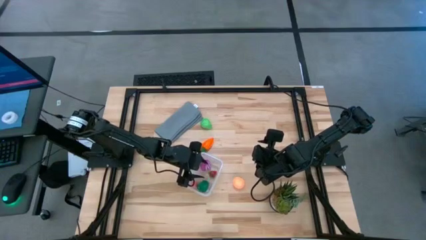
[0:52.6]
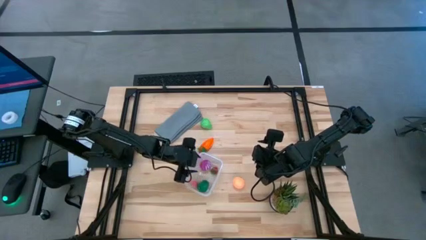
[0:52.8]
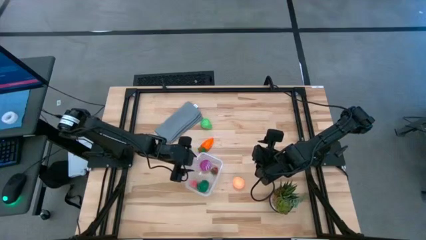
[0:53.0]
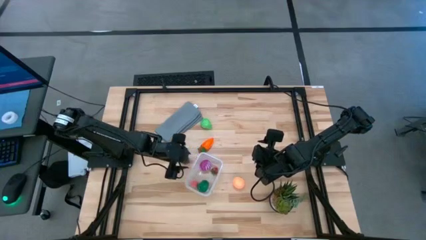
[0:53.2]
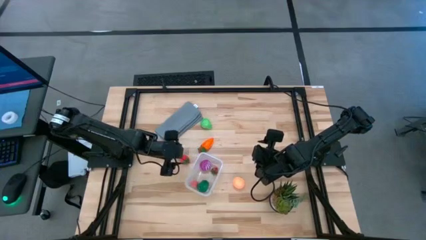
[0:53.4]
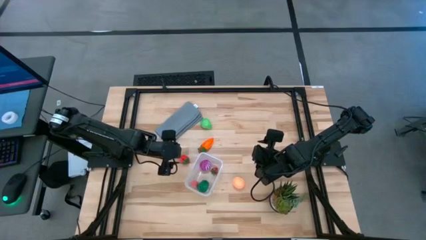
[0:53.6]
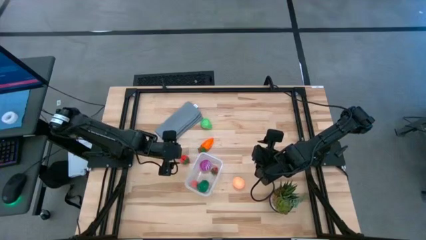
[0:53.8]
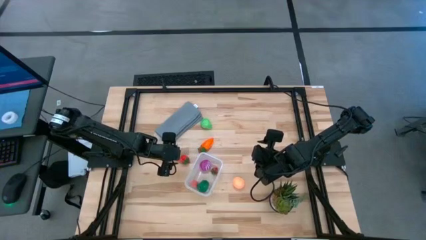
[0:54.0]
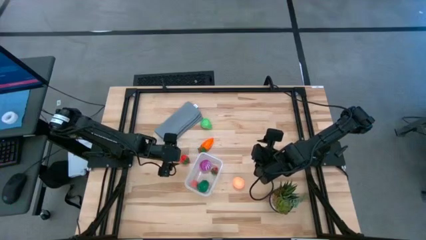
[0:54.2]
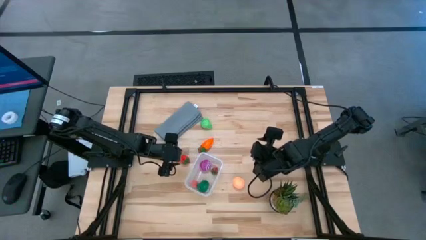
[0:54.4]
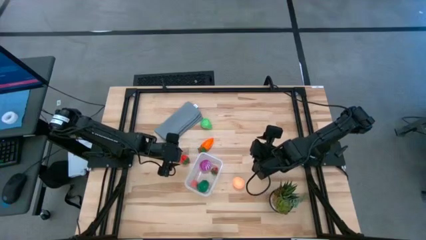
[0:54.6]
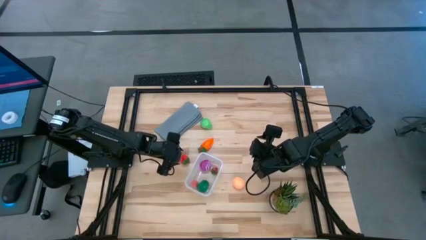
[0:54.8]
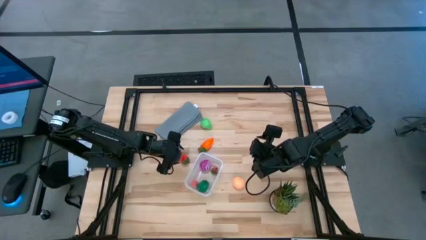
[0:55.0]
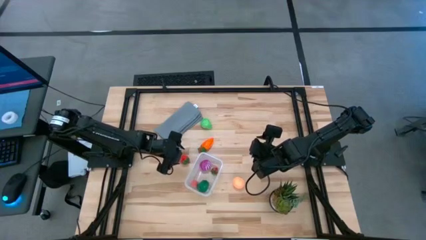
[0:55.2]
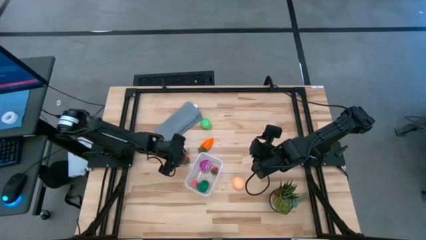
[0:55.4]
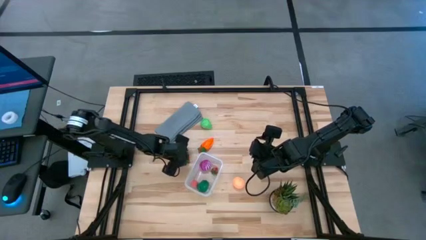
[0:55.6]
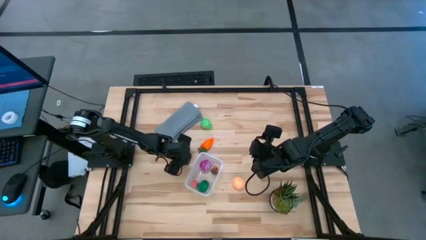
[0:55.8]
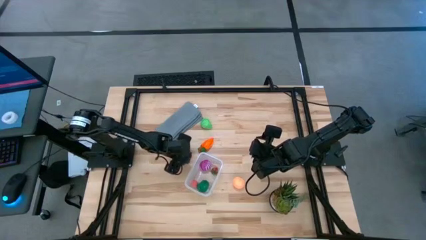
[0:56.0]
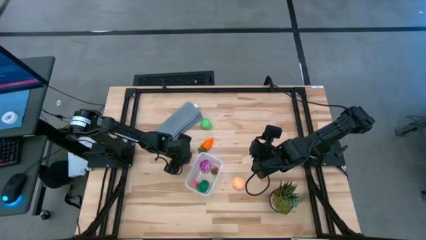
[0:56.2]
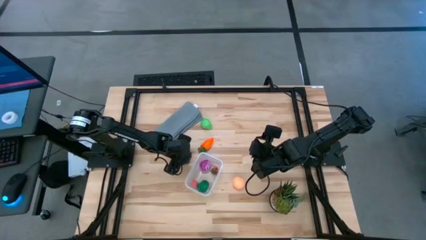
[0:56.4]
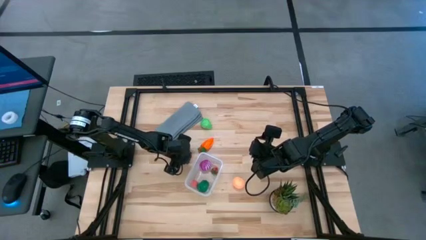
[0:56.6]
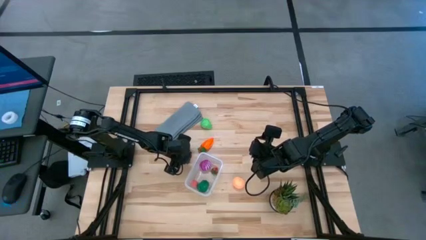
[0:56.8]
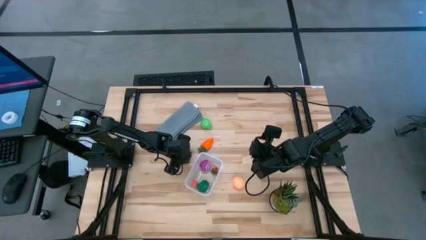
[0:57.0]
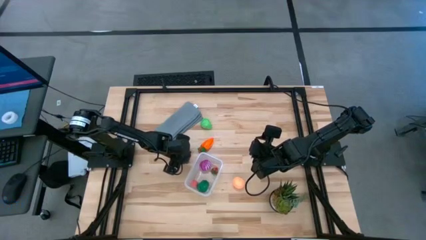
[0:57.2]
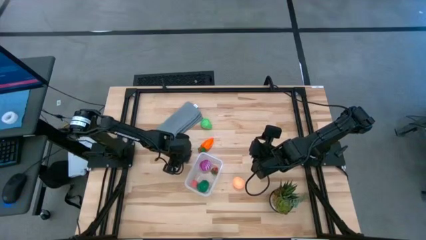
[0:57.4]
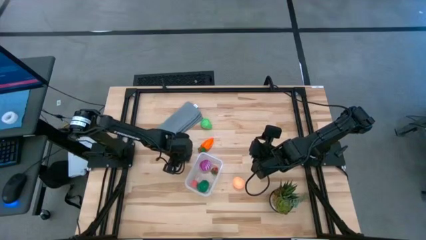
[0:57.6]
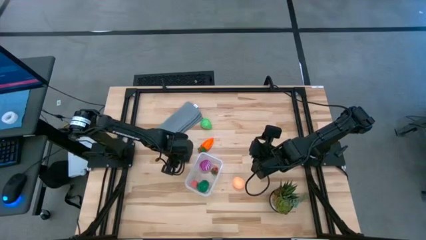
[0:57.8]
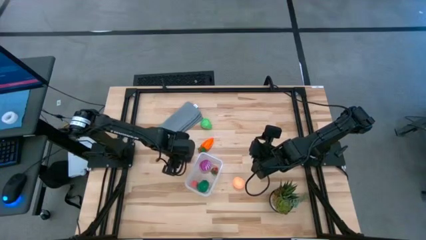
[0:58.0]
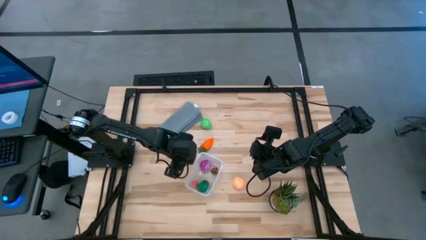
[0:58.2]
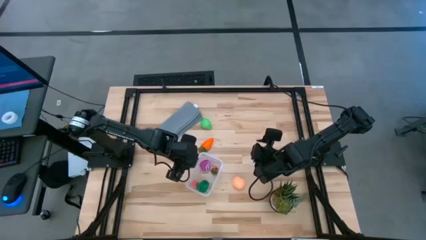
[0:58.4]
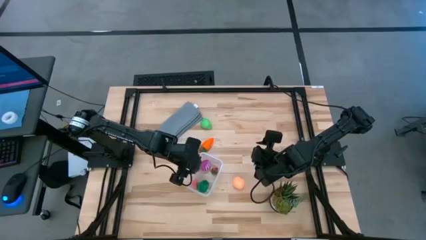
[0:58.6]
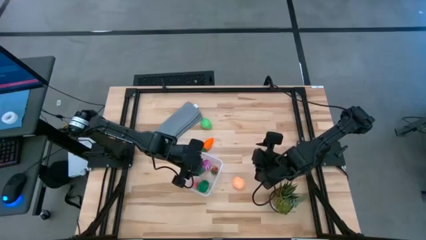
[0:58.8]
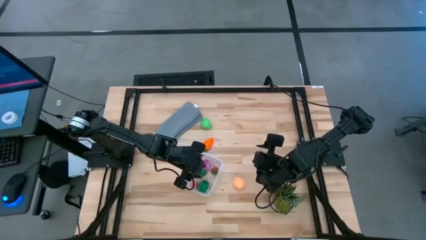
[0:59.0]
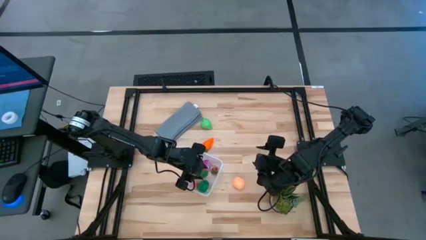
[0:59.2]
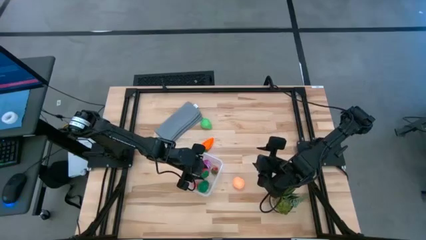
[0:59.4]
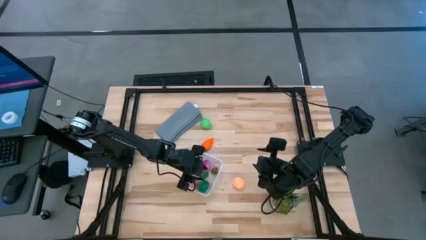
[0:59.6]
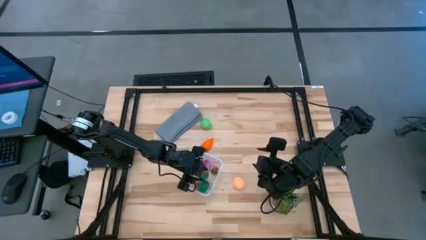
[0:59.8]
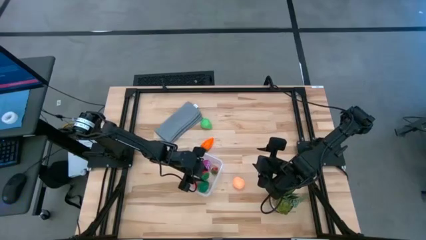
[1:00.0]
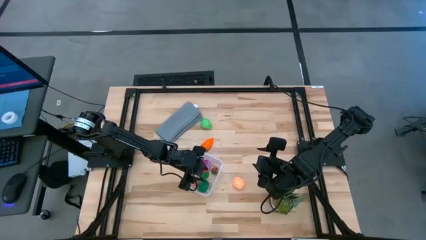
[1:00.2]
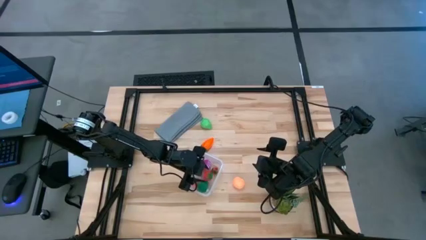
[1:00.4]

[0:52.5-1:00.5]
Task: Pick and placing Produce into tupperware
Put the red strawberry into the transparent bin

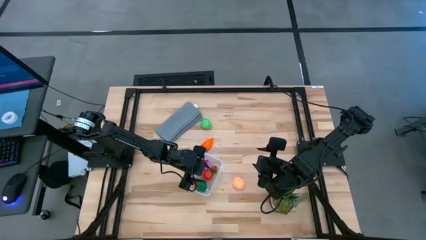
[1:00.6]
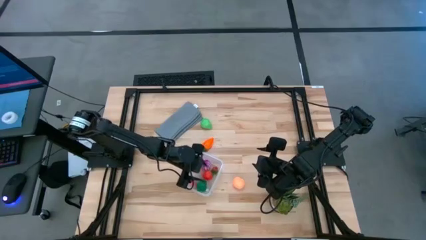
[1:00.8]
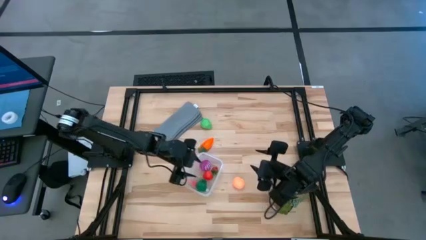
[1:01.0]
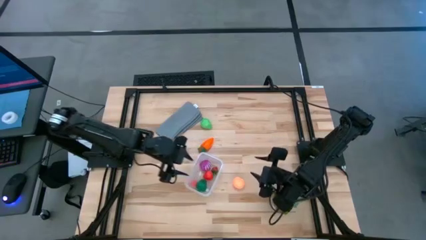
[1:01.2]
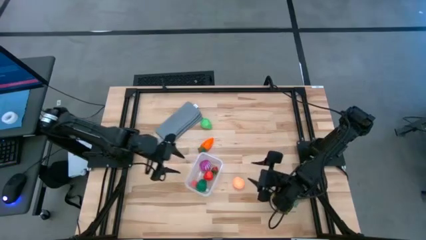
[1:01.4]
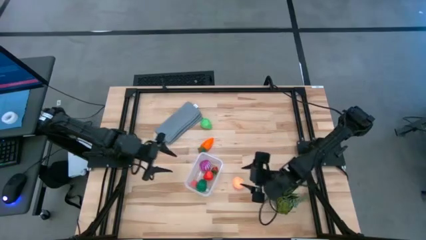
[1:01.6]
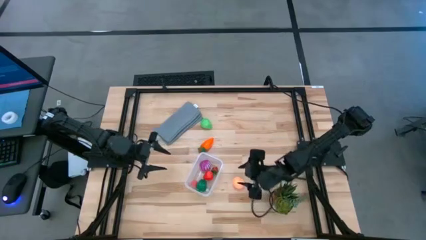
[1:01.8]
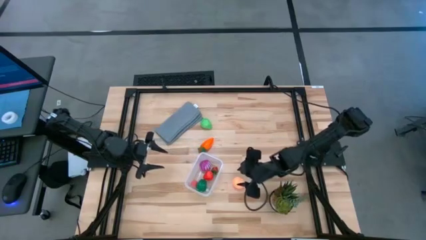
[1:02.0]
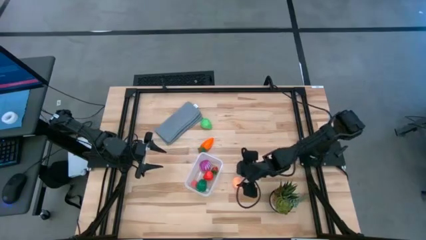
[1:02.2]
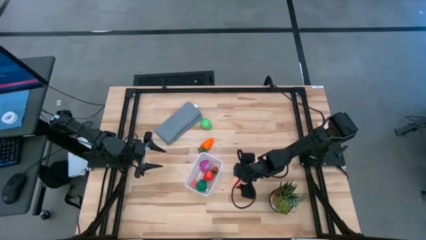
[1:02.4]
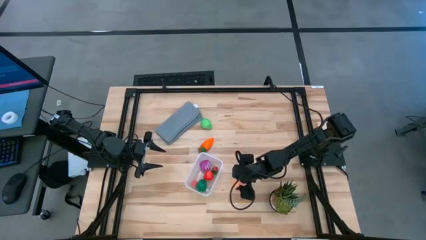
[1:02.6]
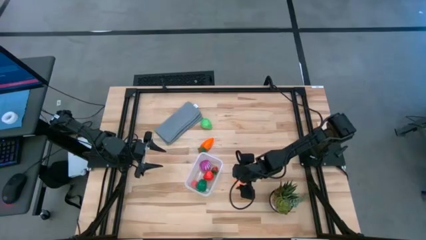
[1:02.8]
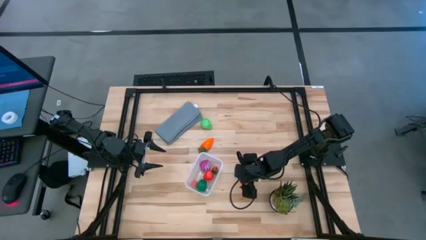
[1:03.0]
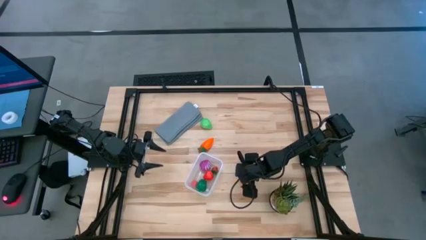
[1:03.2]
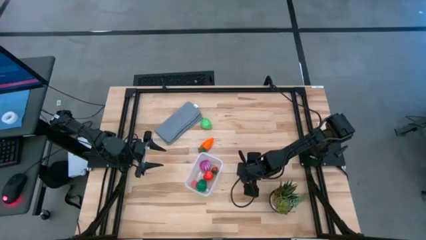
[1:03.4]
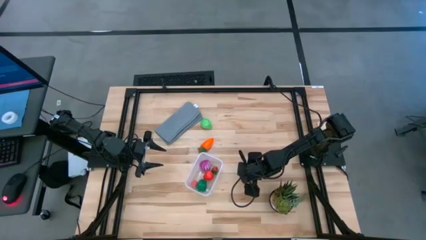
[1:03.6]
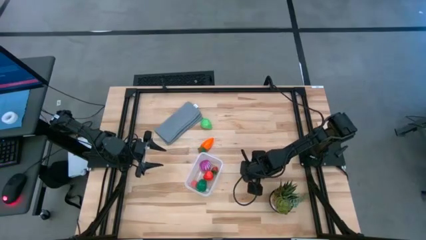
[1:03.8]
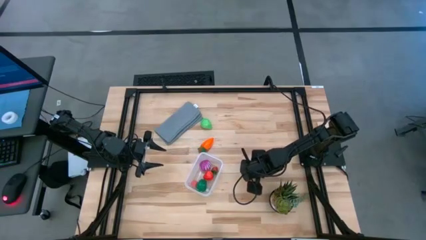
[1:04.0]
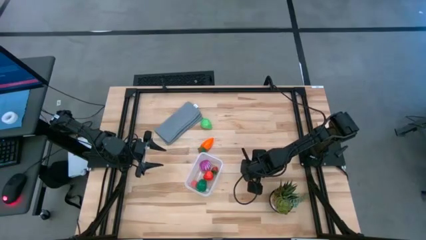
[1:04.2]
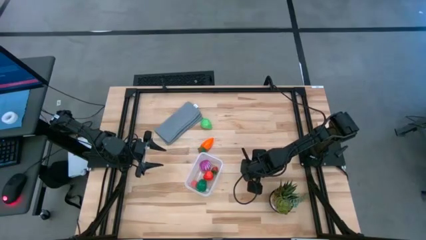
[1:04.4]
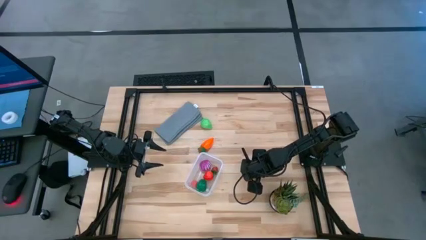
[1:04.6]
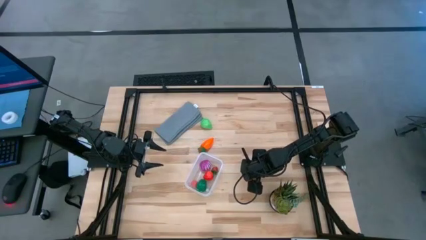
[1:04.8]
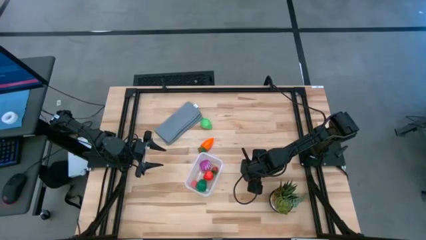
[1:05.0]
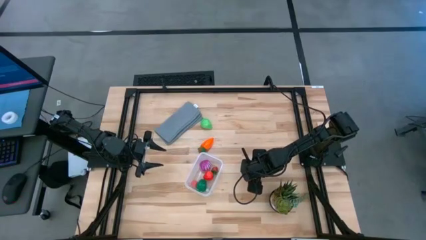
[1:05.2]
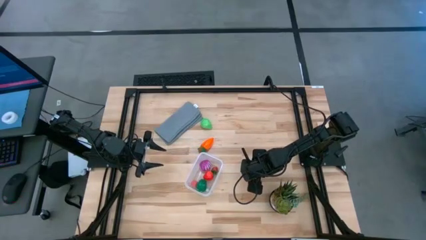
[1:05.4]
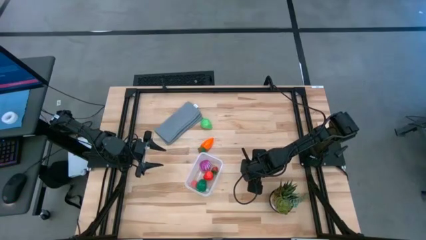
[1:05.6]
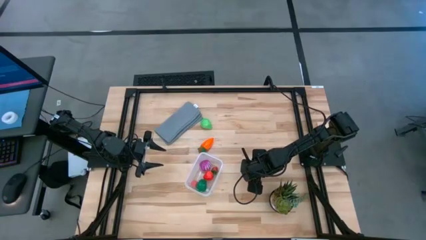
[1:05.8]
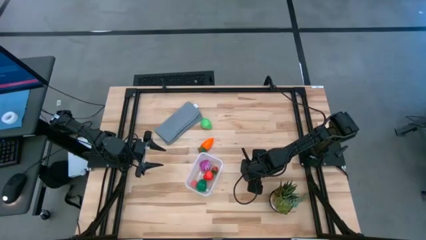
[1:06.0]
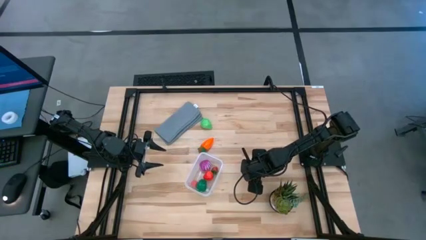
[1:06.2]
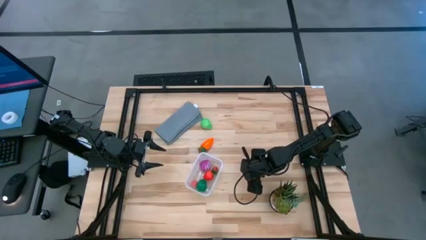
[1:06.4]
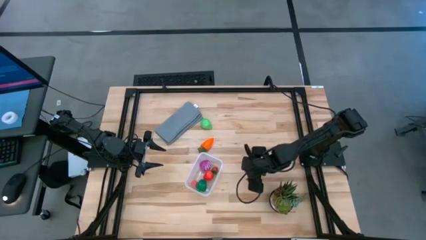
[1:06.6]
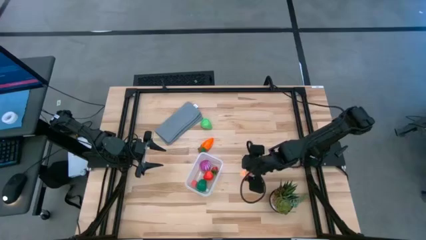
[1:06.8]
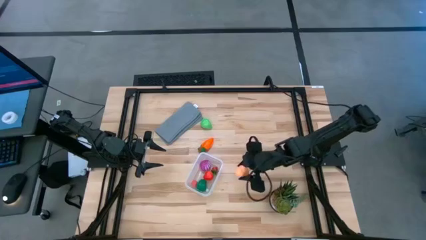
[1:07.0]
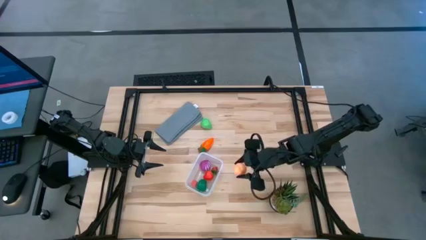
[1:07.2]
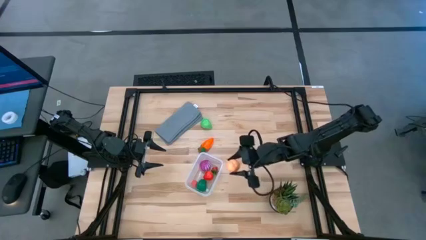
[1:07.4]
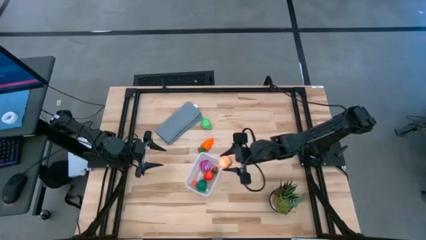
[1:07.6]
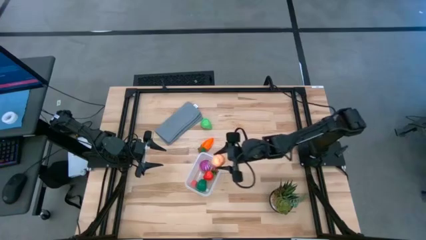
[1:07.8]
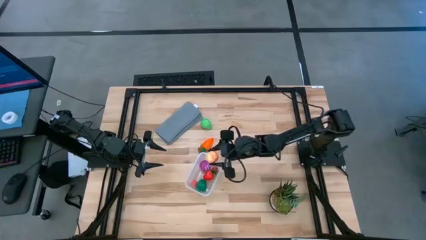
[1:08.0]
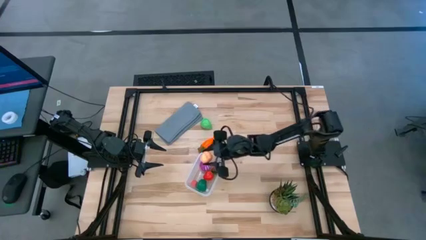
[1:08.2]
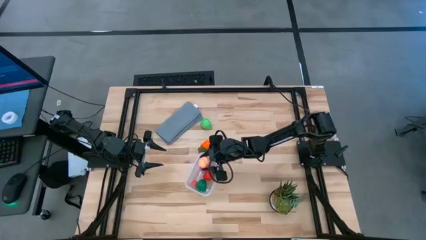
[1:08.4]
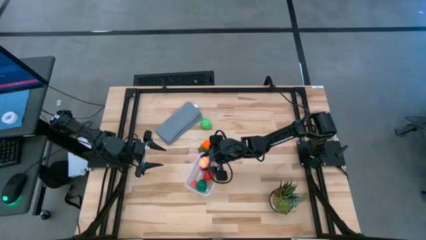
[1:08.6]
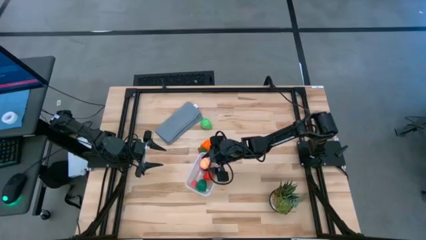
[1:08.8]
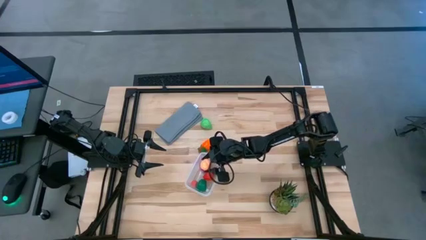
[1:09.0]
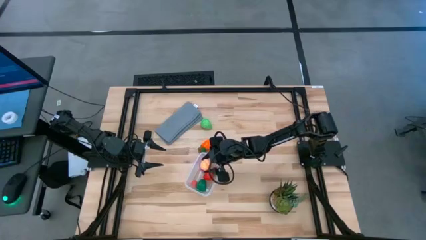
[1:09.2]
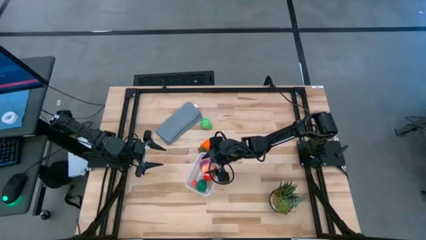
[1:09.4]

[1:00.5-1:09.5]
Put the light brown peach into the transparent bin

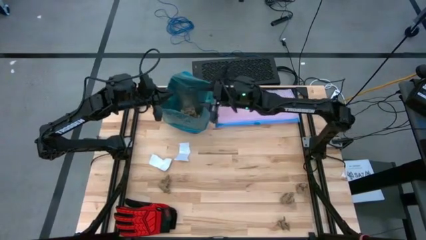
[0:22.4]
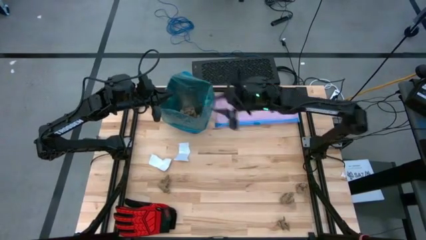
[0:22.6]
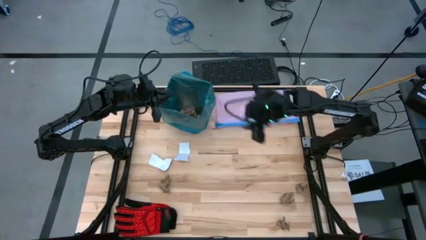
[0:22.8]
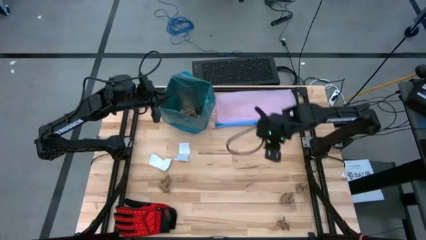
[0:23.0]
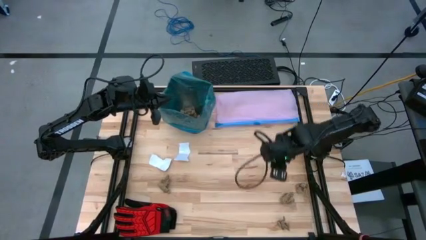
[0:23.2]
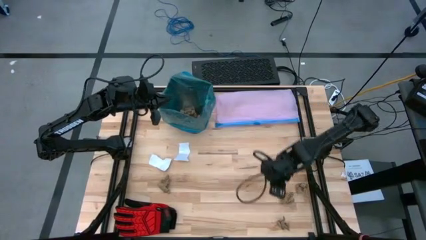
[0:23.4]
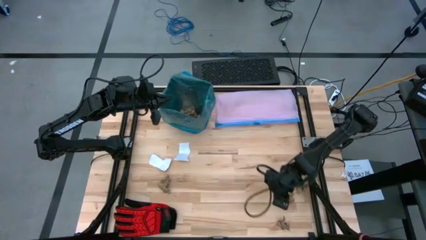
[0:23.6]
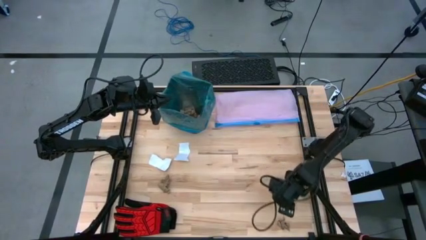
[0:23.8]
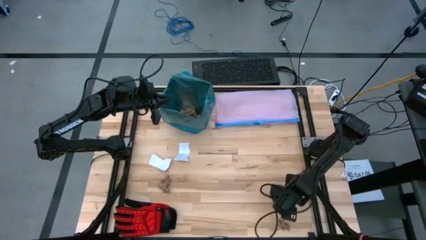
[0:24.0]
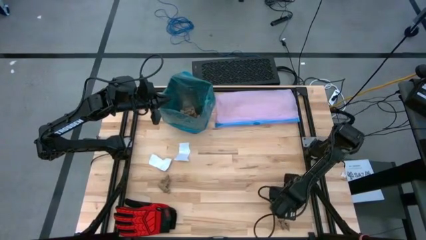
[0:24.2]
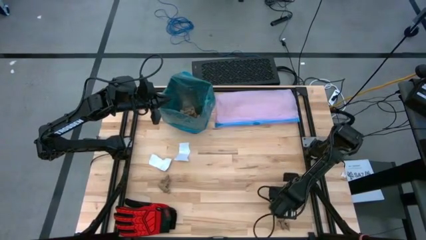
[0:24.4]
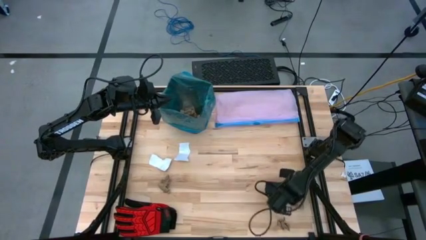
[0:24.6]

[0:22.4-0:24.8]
Task: place trash/remove bag and relplace
Put the brown napkin into the trash bin
